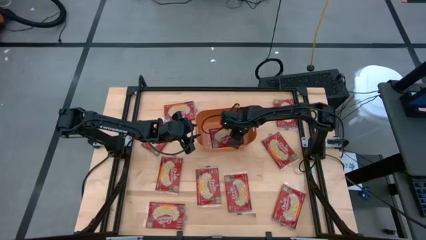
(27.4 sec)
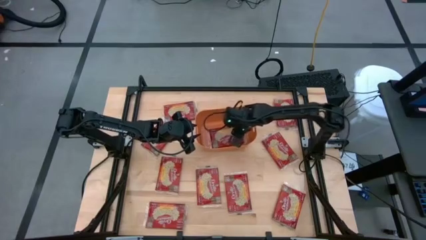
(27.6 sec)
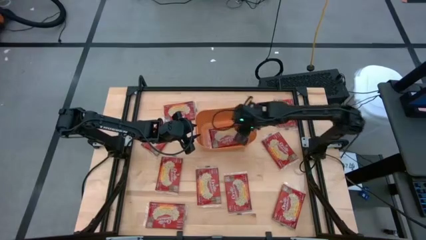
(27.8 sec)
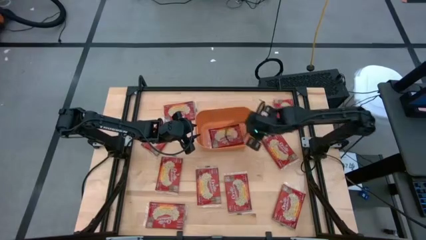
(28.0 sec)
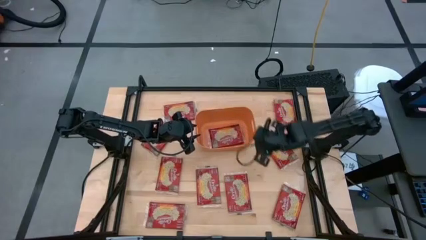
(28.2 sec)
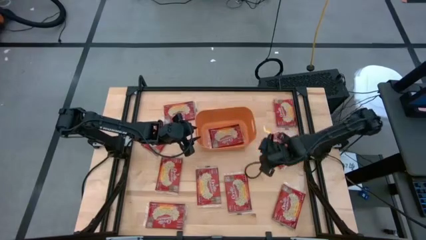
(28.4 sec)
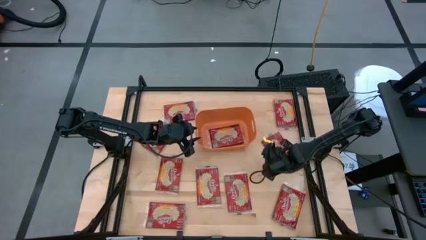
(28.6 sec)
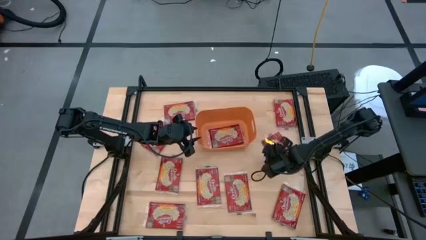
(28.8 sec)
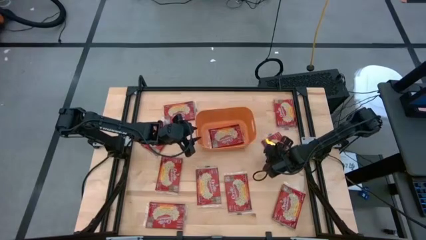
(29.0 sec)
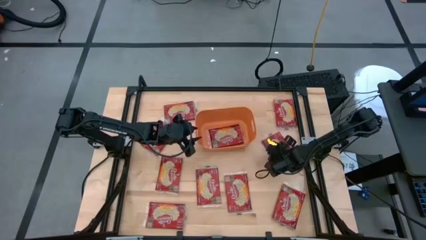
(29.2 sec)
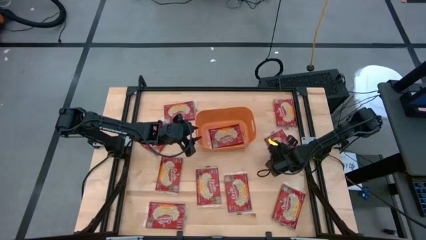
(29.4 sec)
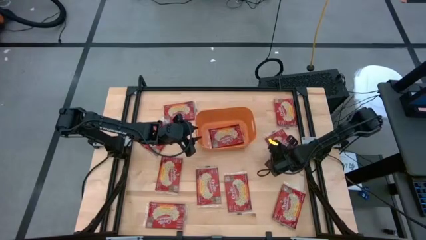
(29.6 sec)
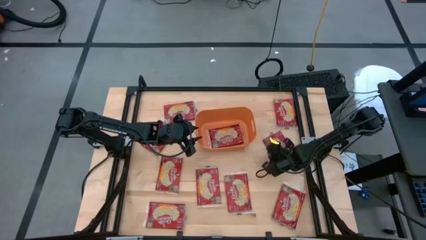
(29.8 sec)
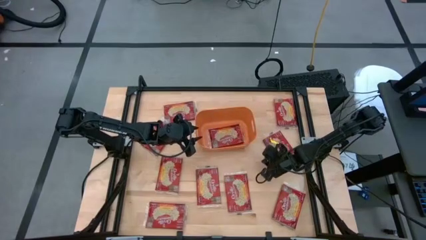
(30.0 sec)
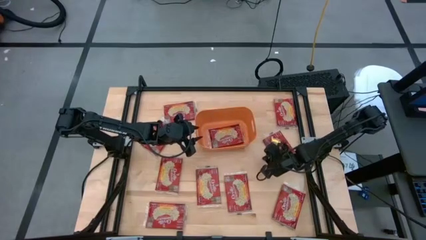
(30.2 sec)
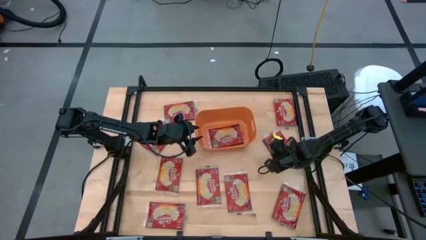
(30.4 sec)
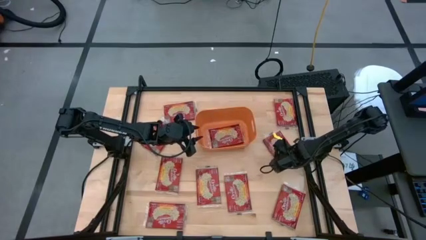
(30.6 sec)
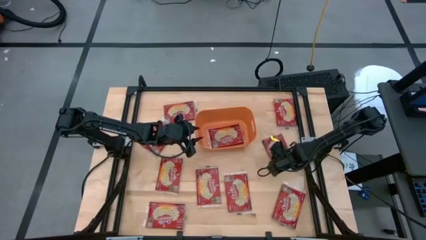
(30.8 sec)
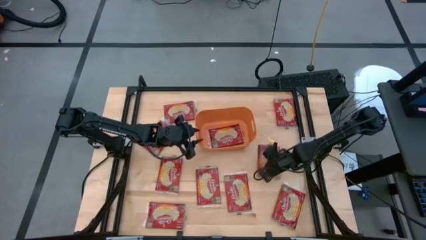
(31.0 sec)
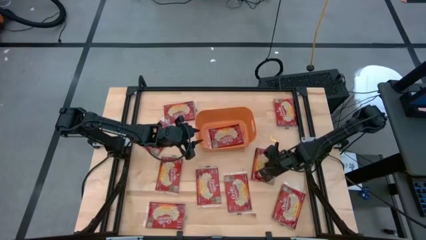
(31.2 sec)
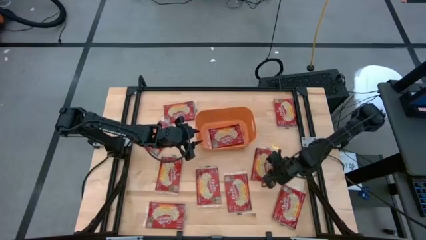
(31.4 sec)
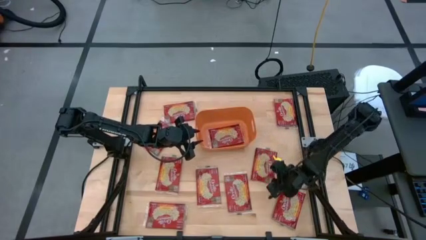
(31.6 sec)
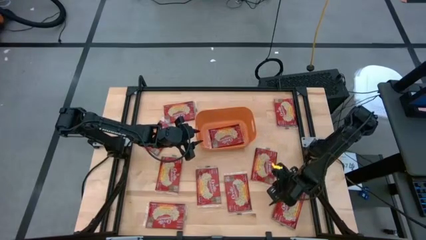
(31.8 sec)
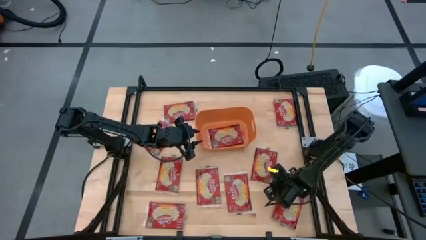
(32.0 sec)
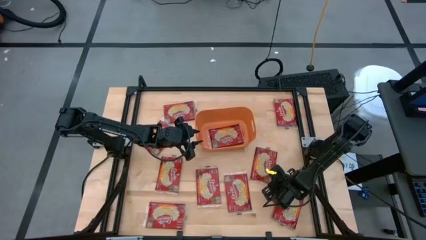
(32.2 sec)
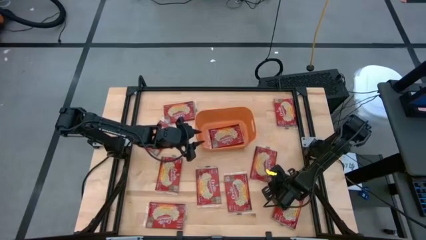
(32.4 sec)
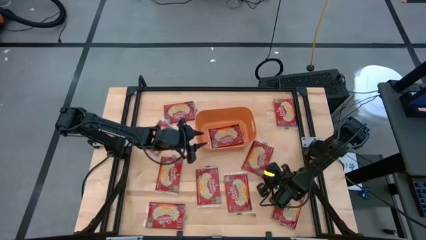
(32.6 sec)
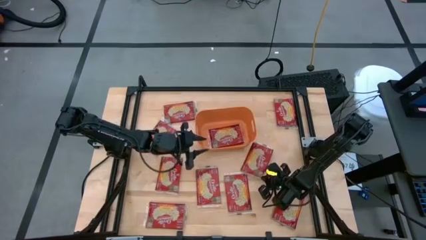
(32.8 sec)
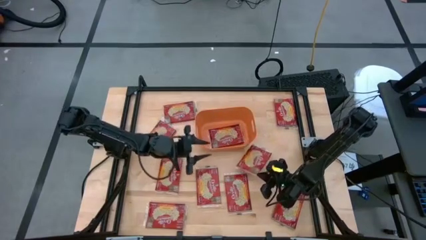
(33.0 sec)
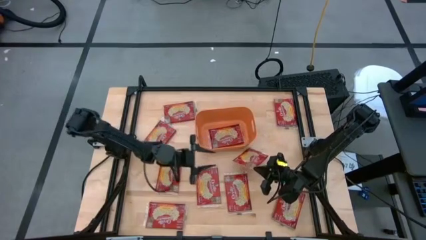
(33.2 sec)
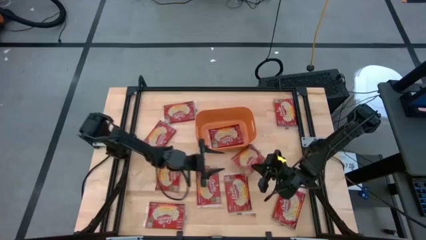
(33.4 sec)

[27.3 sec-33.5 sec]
Task: Sort popcorn bags into baskets
Put the red popcorn bag into the orange bin

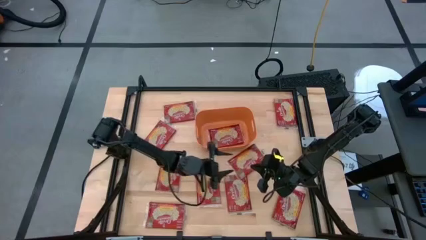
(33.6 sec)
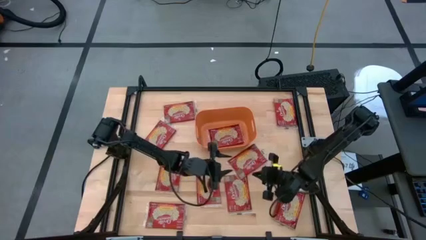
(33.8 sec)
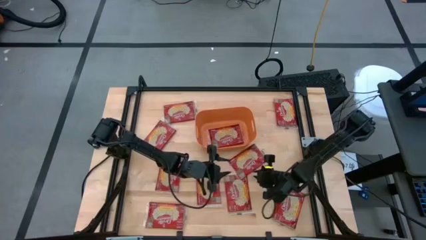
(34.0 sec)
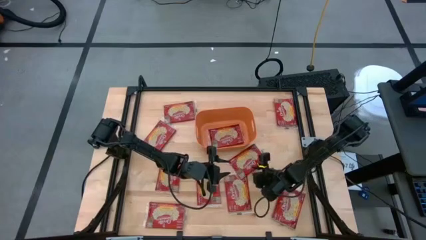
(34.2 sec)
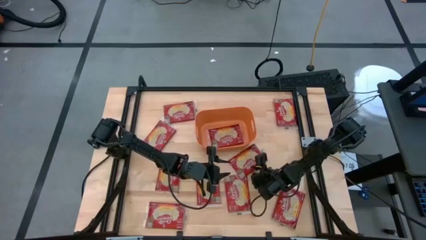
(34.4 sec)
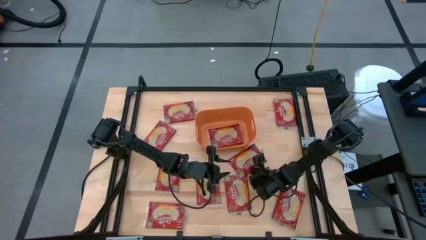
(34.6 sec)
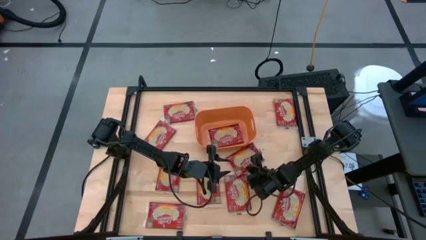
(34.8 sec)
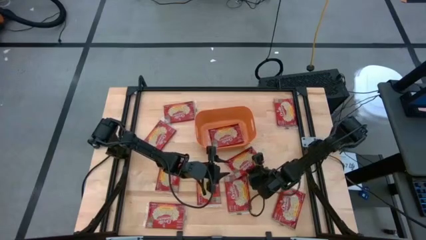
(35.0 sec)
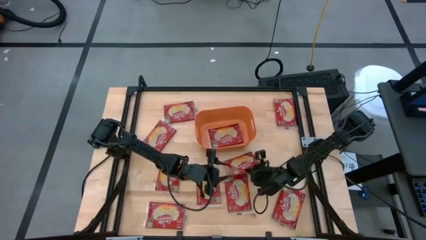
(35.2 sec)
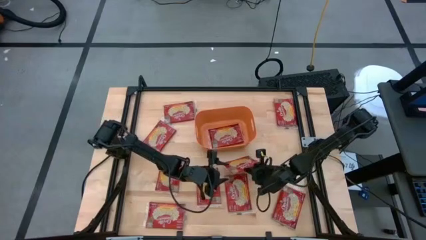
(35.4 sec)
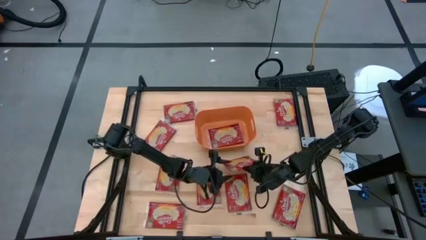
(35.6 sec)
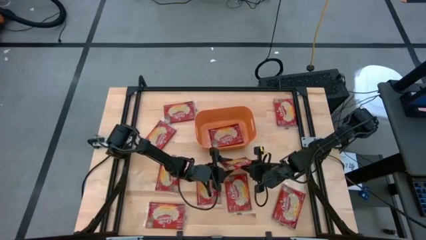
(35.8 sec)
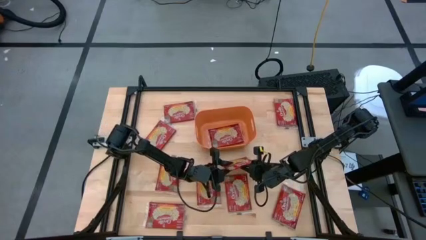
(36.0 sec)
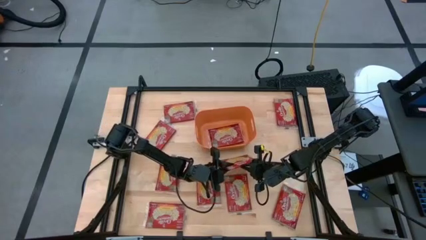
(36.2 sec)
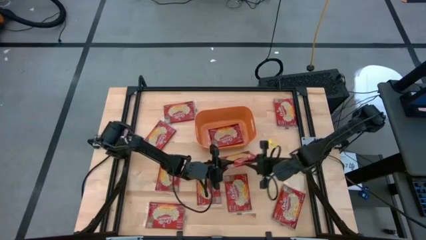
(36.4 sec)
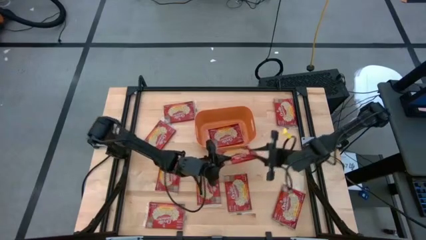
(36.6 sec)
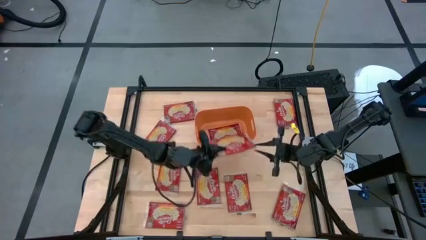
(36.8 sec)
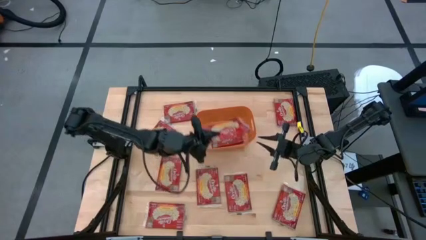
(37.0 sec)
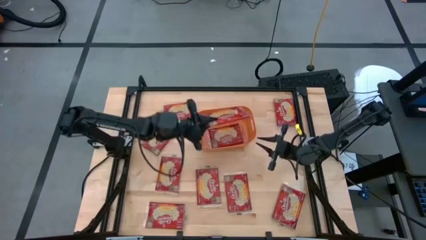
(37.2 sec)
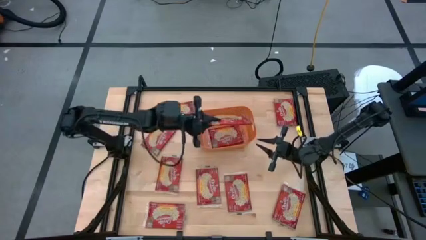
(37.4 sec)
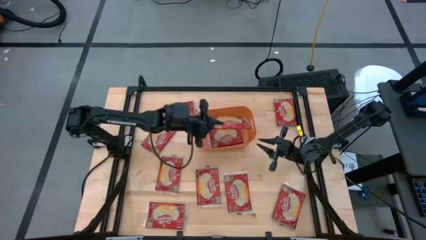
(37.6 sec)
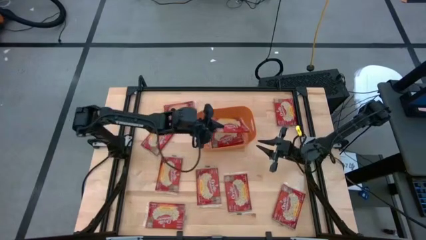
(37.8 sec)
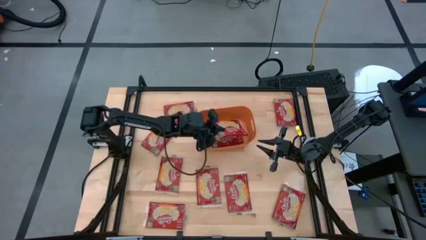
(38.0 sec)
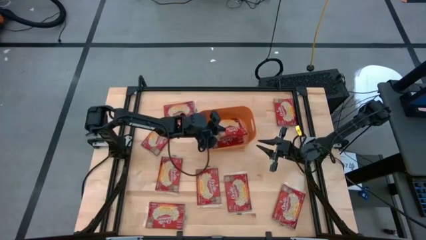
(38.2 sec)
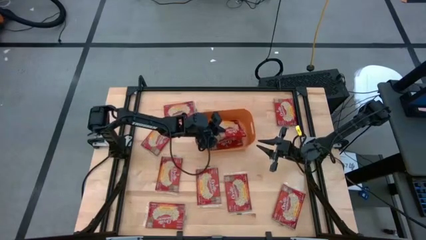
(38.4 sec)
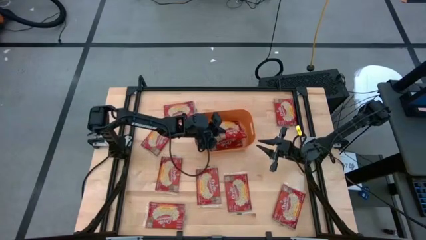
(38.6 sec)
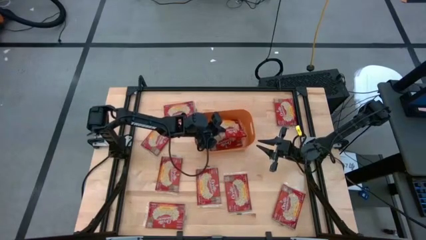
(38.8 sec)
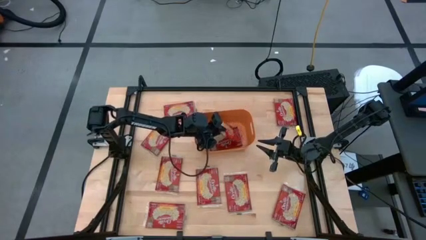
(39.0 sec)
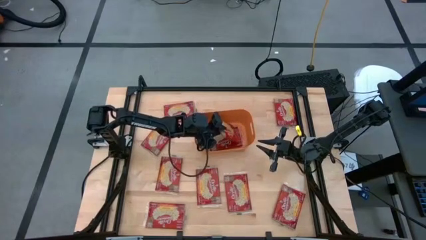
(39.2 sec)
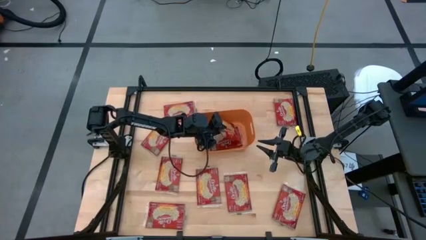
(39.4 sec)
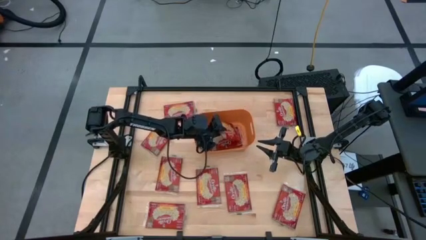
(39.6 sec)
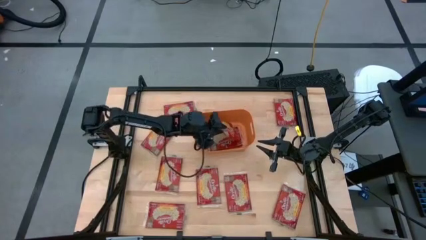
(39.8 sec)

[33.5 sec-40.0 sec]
Put the red popcorn bag into the orange bin
